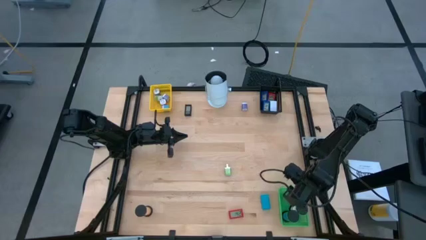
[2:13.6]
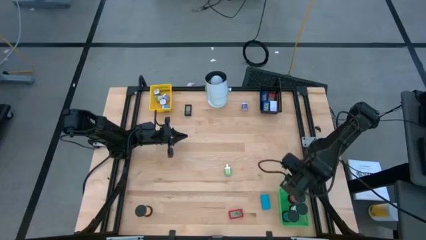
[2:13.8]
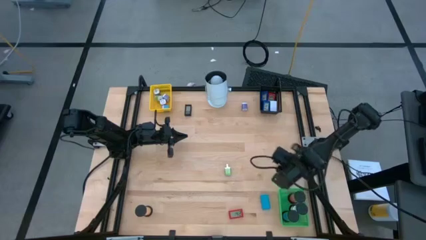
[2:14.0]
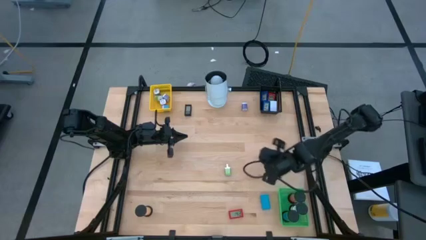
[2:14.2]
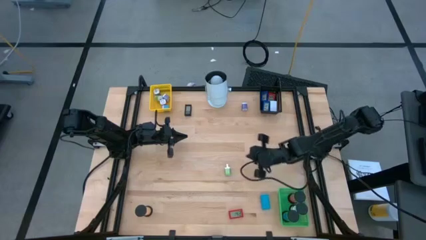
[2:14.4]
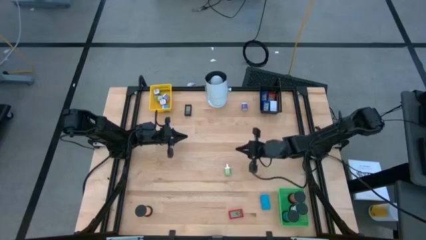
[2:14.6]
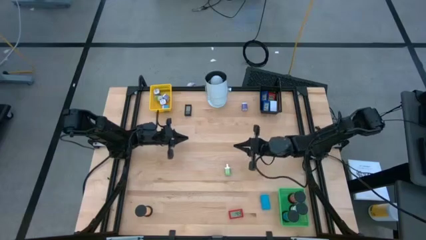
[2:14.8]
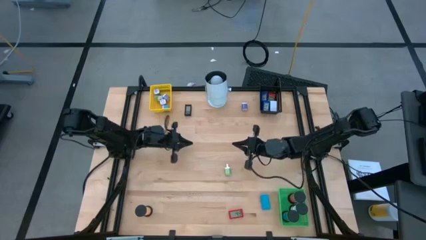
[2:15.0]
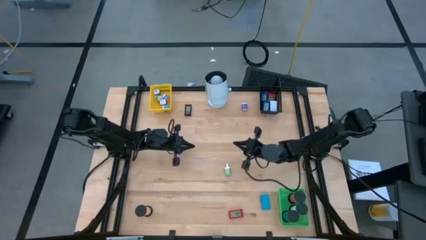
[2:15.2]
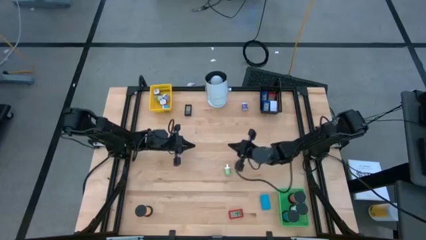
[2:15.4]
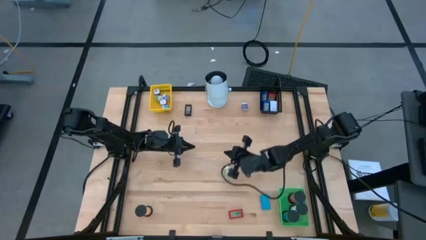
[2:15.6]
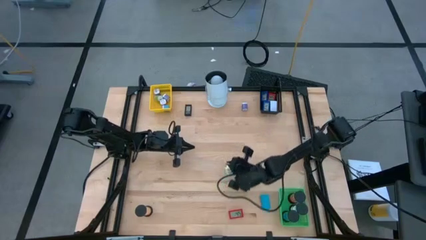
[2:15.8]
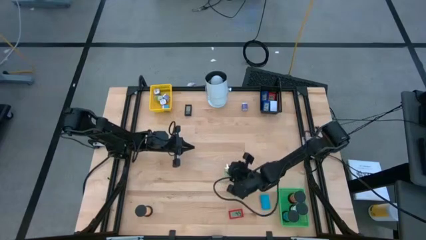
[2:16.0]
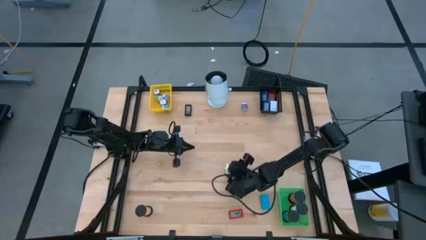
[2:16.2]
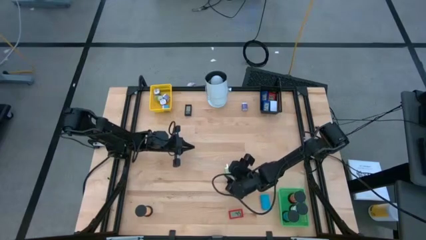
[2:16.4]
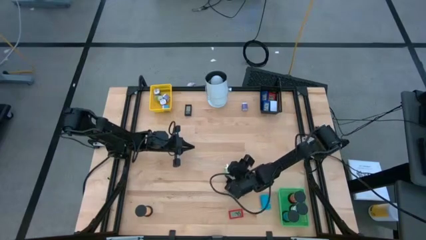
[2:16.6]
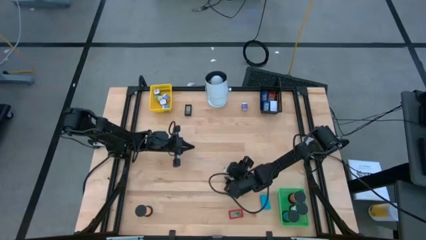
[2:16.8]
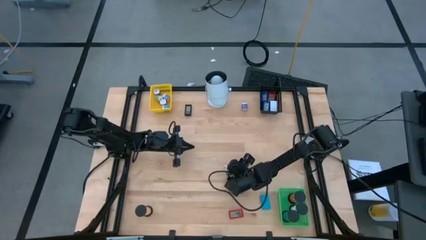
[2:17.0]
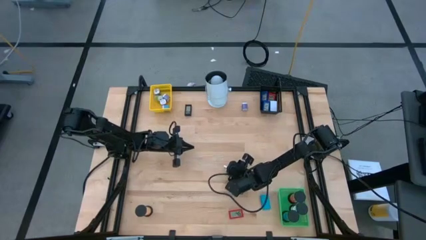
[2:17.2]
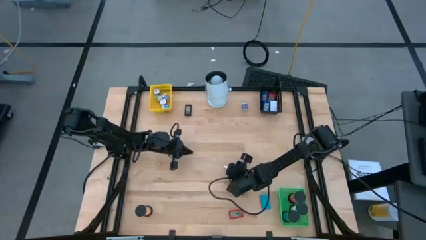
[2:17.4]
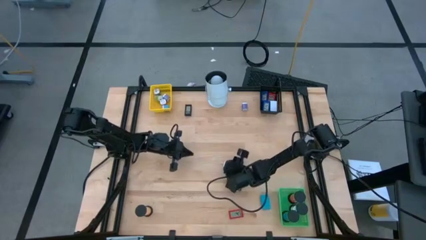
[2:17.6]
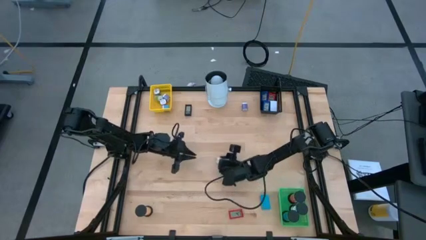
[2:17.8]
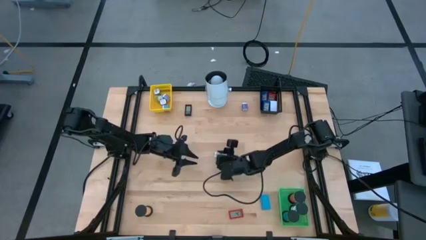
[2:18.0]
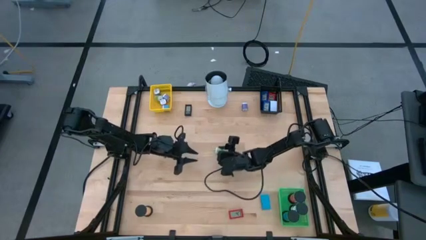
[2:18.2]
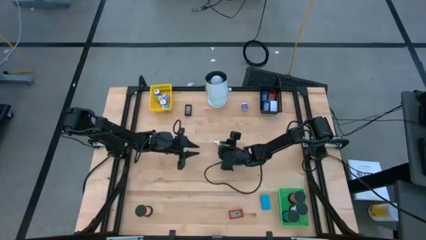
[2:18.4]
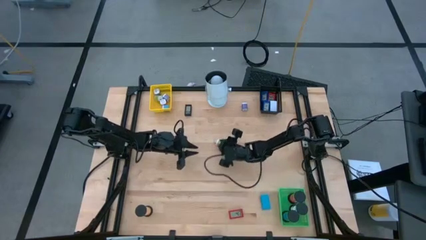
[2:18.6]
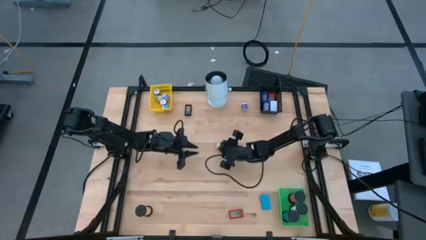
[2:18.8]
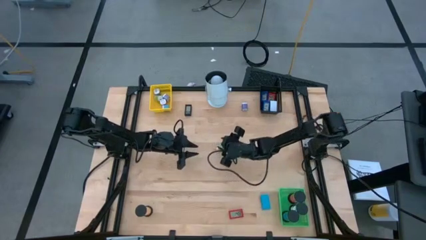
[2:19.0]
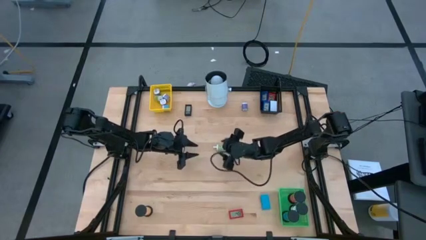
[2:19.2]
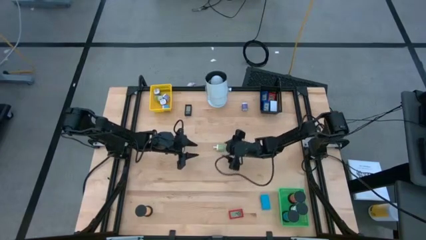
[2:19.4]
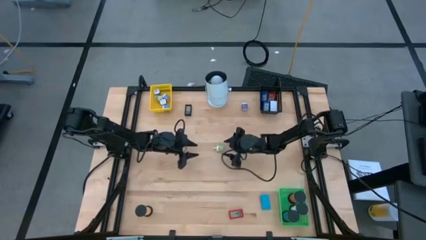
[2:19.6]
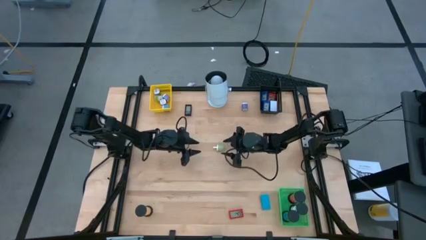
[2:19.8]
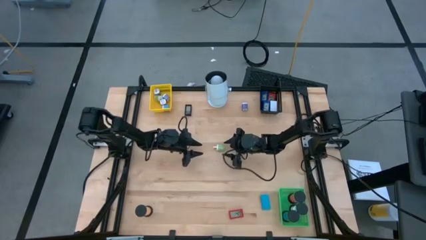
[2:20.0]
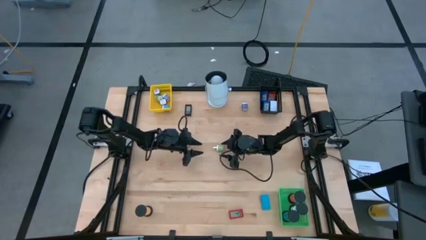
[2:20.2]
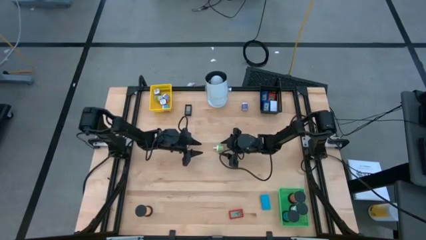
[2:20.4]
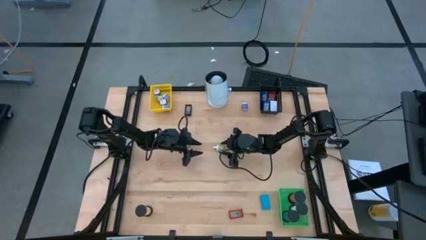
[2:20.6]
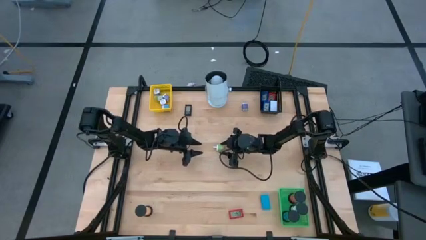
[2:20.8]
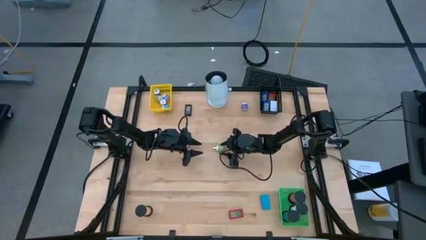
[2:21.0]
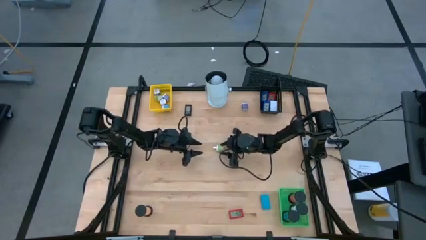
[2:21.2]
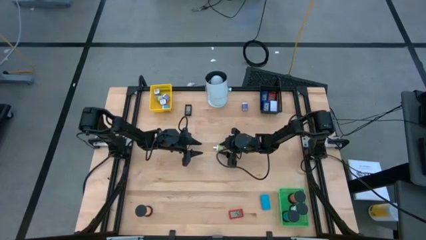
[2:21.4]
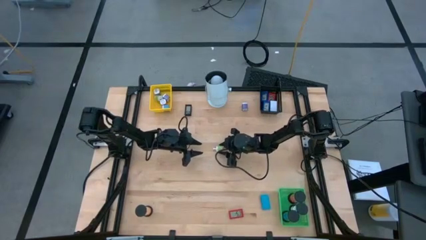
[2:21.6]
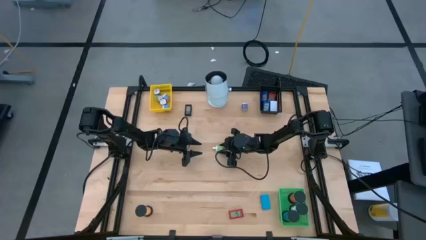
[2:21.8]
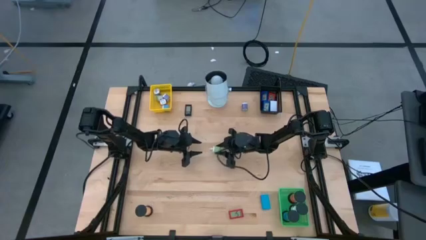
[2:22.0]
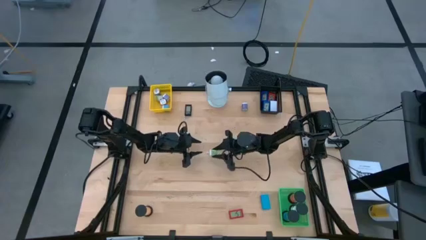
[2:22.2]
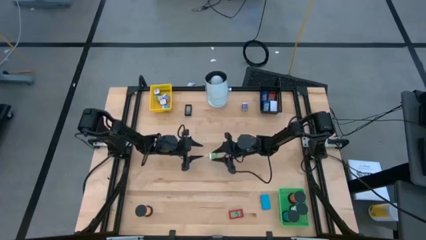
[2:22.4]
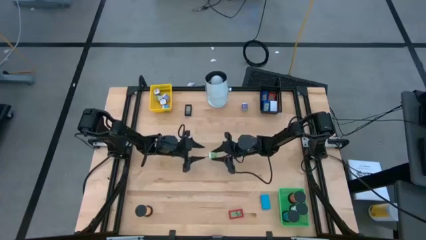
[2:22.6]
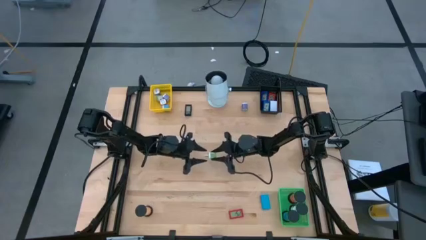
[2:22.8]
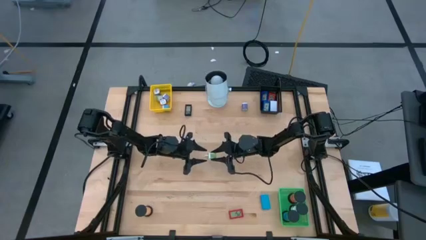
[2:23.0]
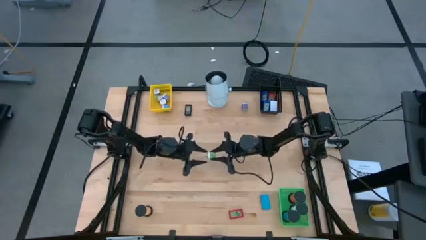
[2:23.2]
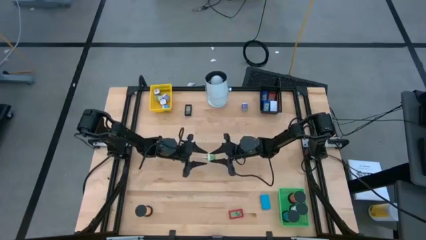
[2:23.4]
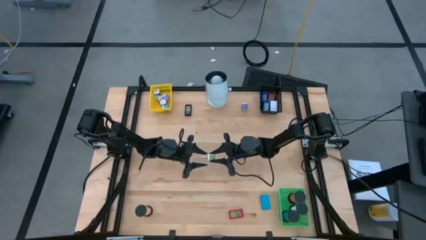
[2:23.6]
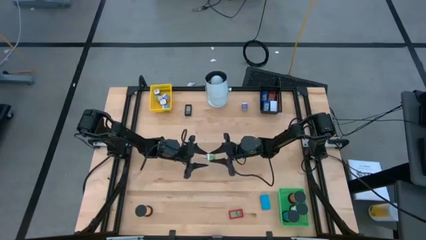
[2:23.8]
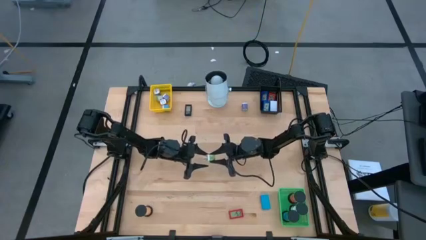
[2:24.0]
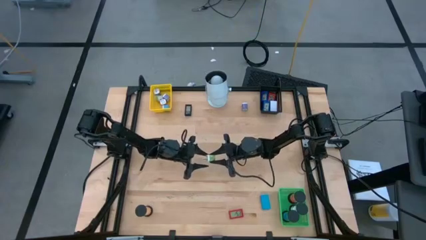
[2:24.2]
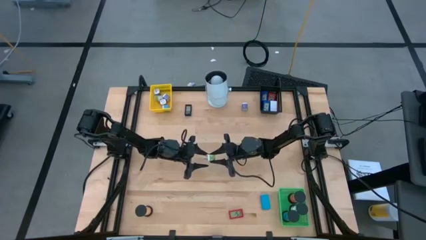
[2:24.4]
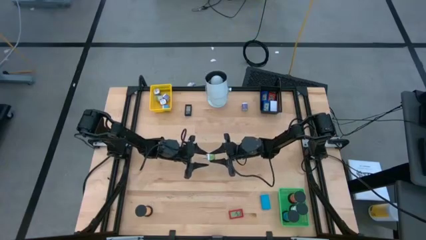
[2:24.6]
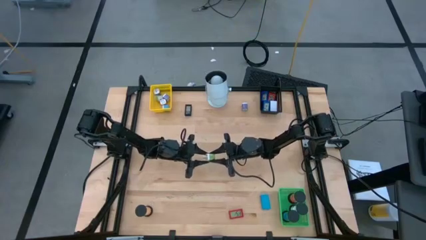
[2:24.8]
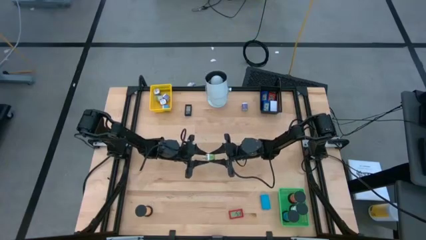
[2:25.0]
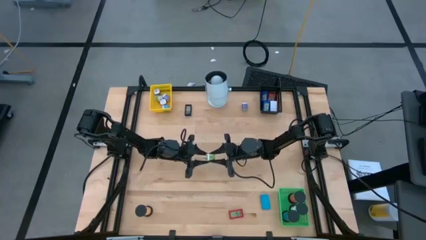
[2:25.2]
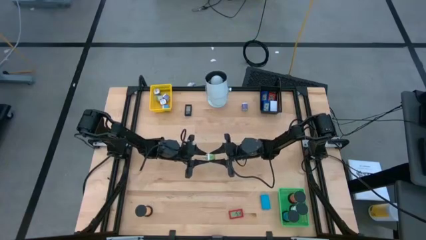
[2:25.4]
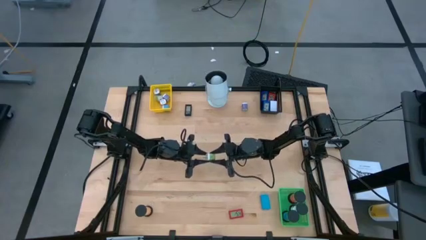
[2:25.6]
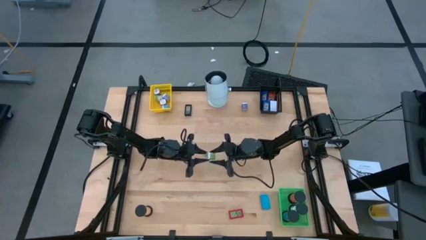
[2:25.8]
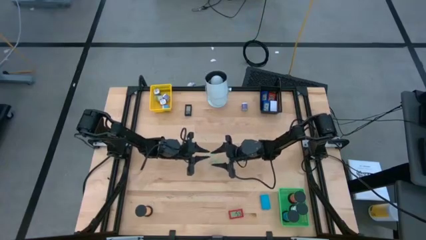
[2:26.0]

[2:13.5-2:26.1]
Task: Pick & Place Office items
Put the green charger adapter into the yellow bin

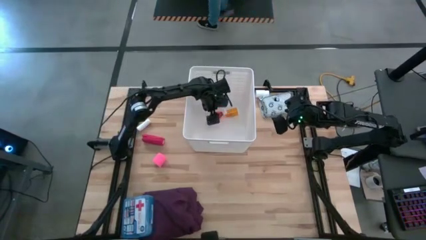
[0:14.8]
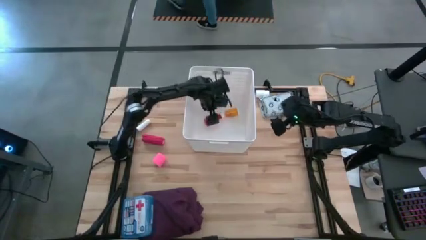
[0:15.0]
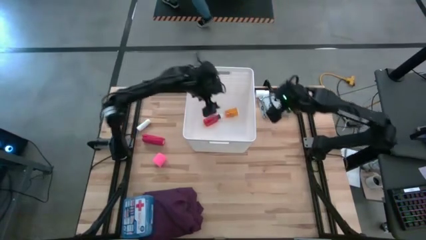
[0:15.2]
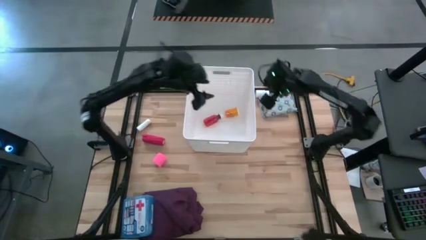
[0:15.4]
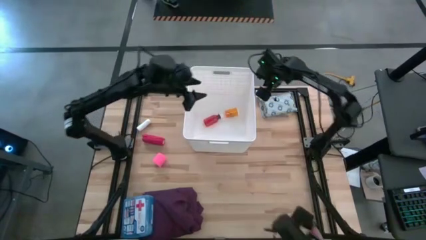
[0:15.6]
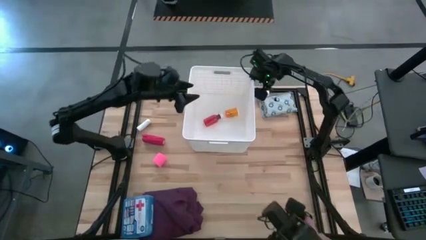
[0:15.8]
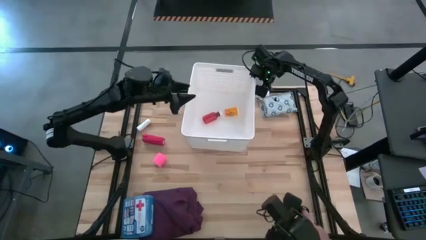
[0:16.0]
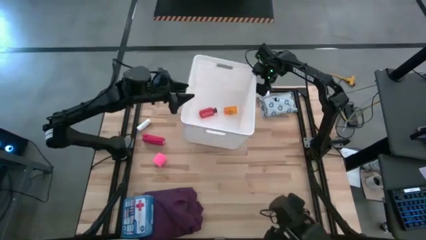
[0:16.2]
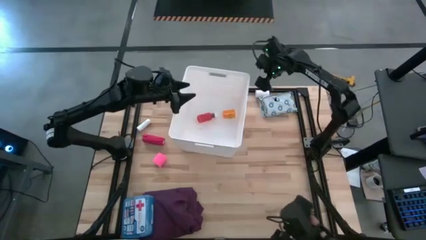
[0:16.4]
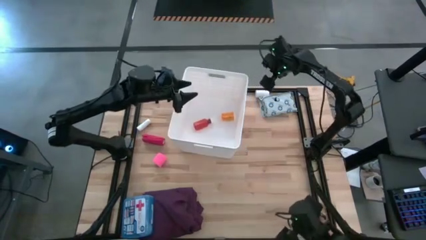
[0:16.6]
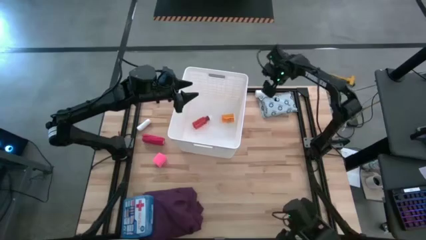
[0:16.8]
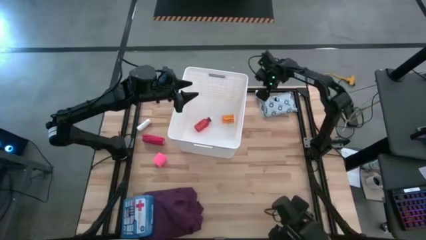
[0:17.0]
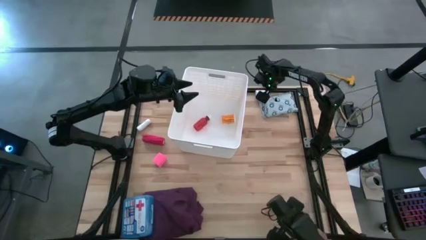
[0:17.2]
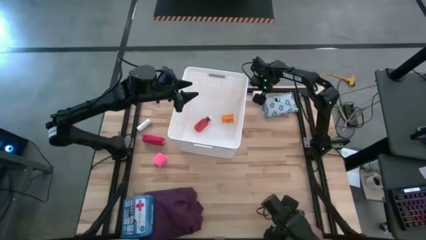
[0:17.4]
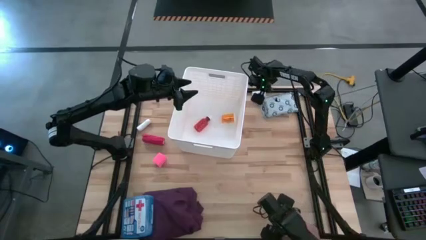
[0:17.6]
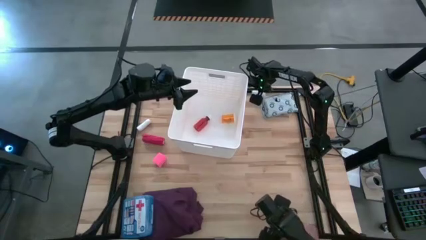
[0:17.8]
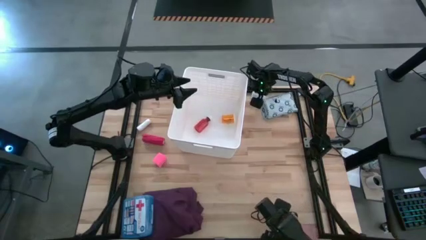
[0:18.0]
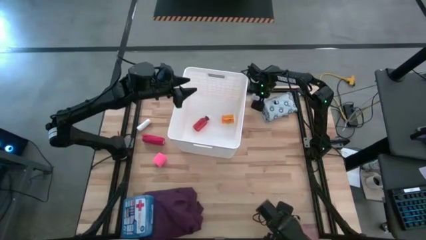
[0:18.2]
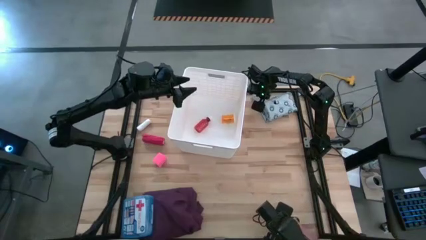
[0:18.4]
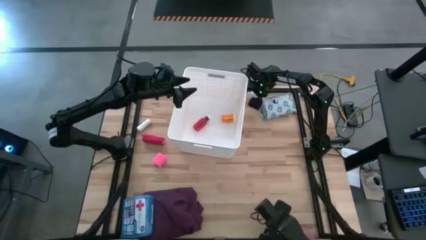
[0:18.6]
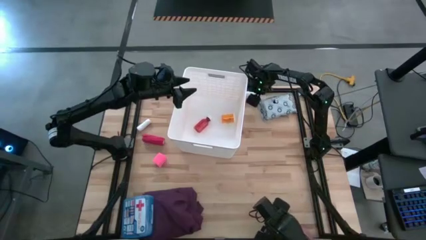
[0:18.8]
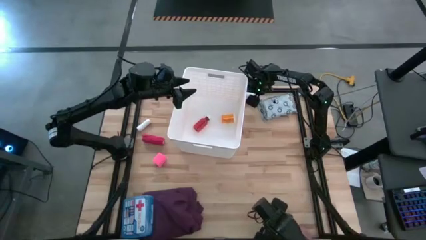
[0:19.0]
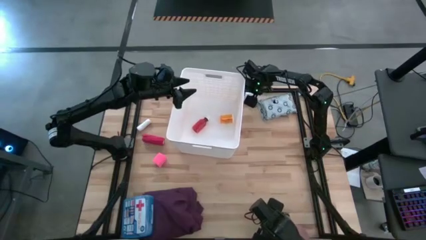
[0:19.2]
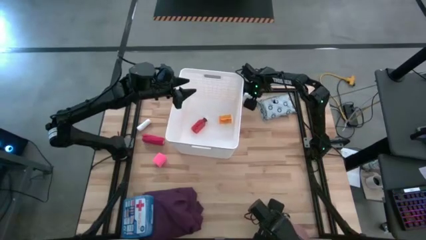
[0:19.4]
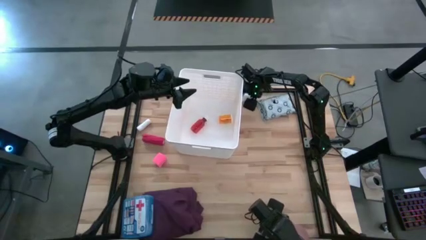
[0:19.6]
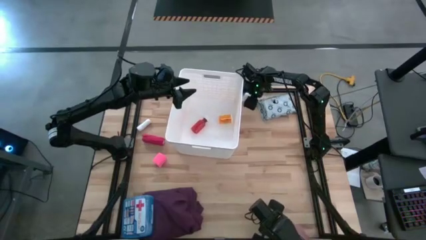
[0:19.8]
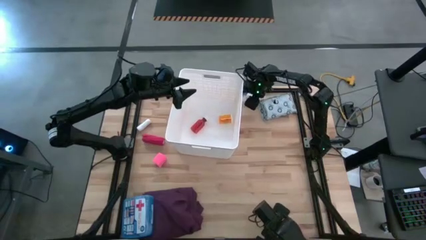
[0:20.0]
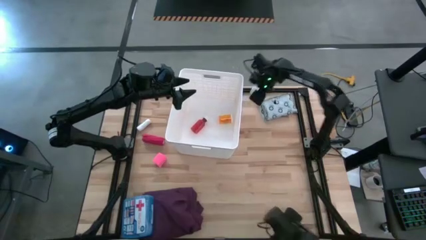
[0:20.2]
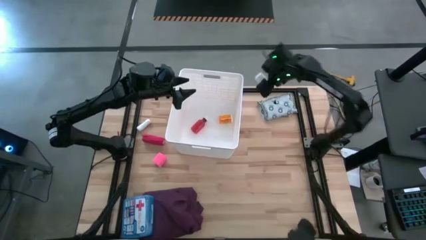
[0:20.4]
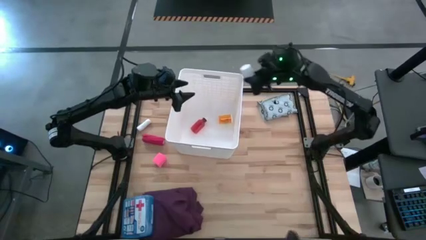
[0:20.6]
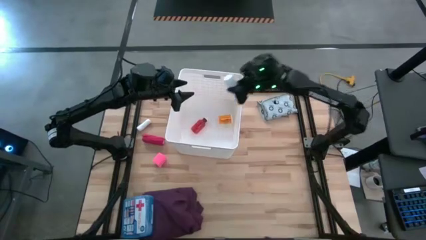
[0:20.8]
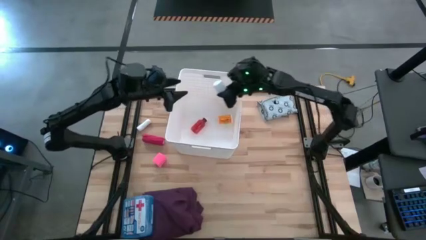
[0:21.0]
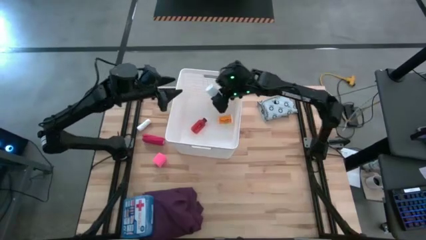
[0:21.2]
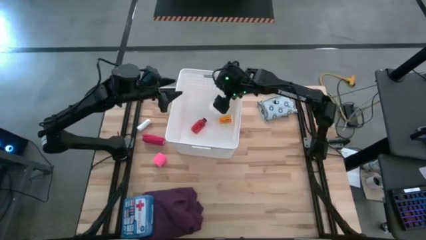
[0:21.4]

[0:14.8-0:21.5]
Task: Pick & place medical supplies in basket/bin
Put the white medicine bottle into the white bin
